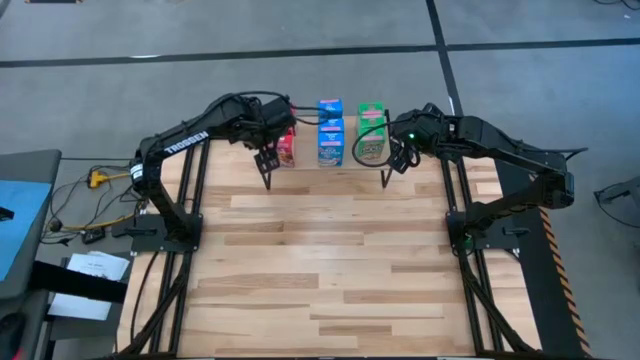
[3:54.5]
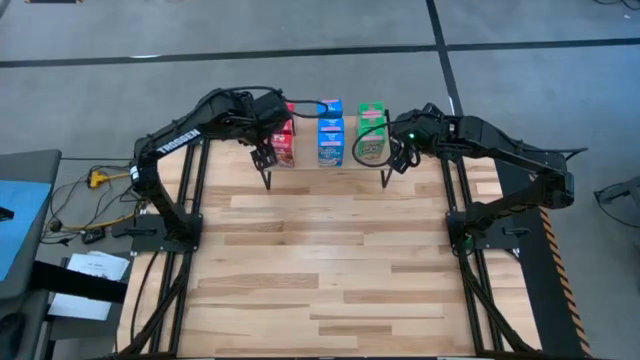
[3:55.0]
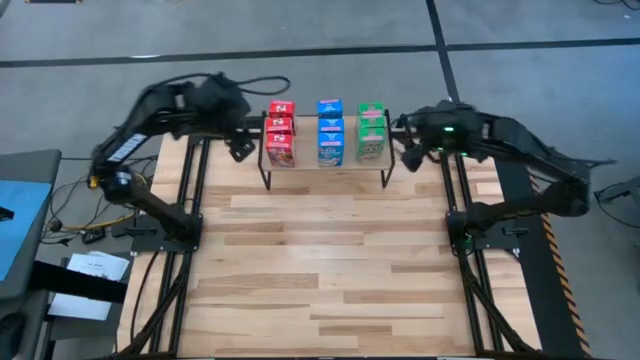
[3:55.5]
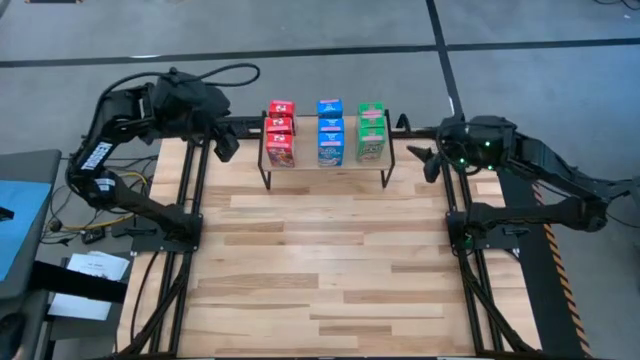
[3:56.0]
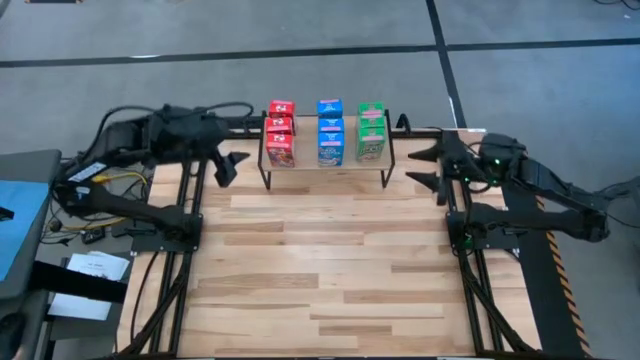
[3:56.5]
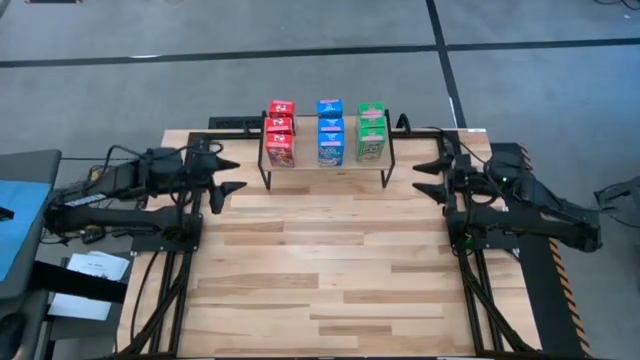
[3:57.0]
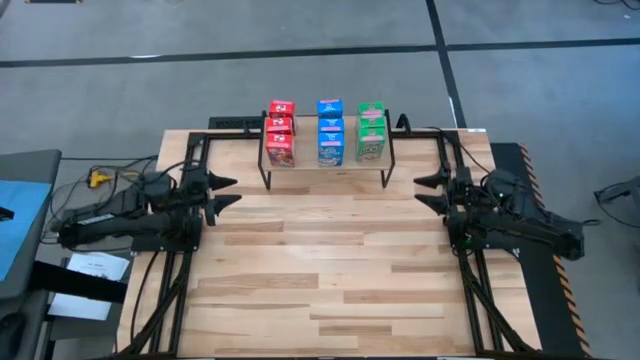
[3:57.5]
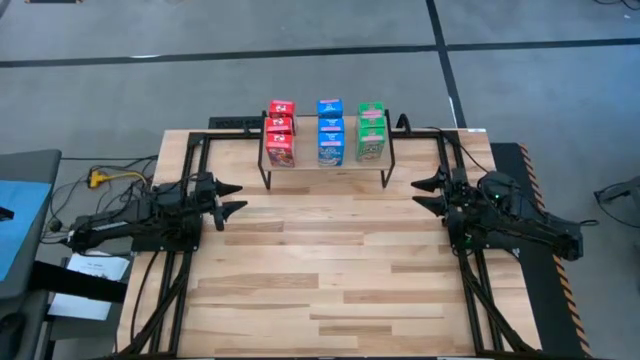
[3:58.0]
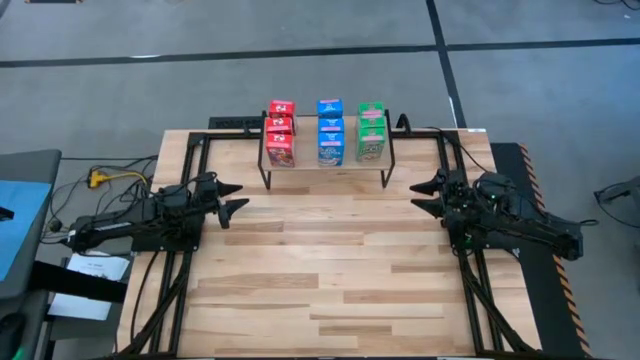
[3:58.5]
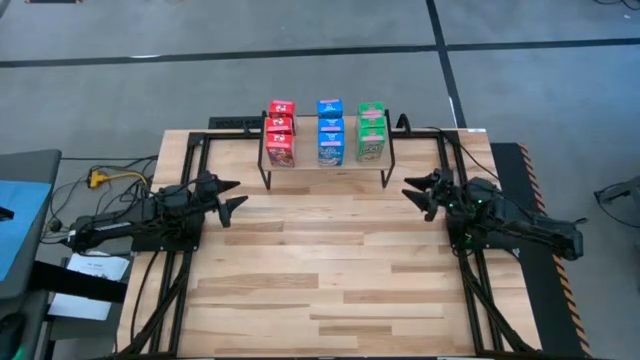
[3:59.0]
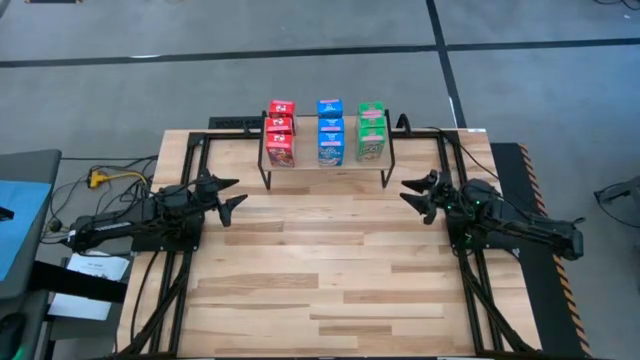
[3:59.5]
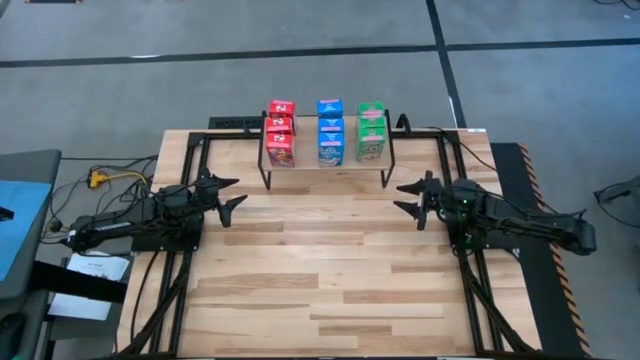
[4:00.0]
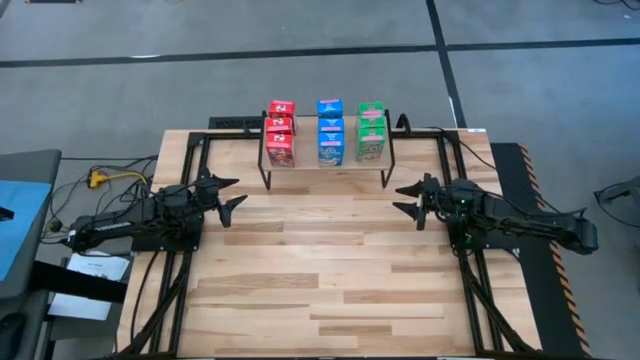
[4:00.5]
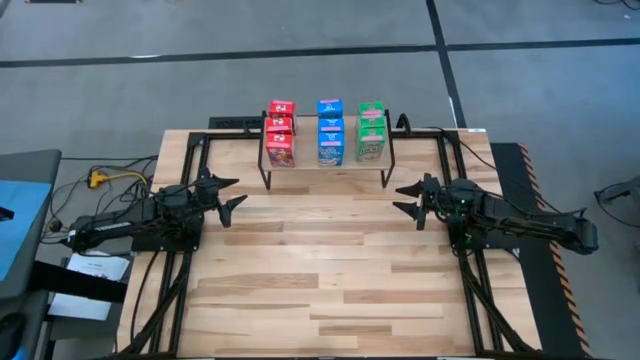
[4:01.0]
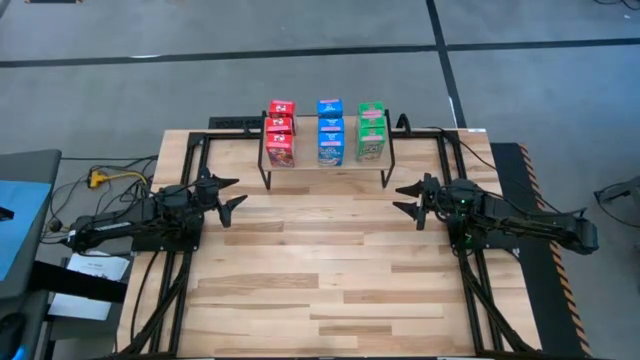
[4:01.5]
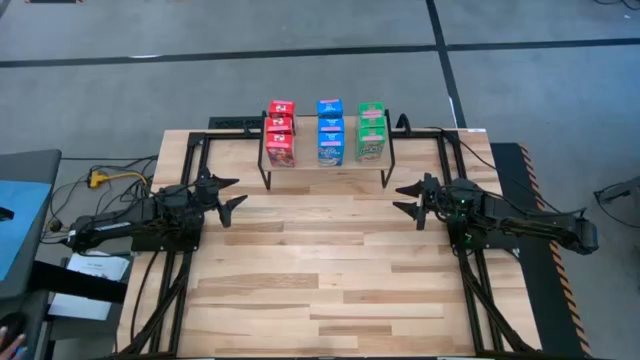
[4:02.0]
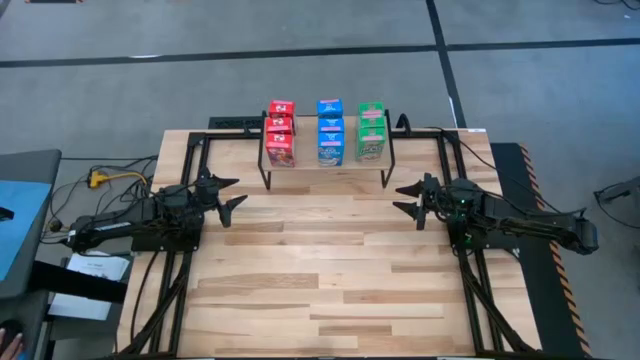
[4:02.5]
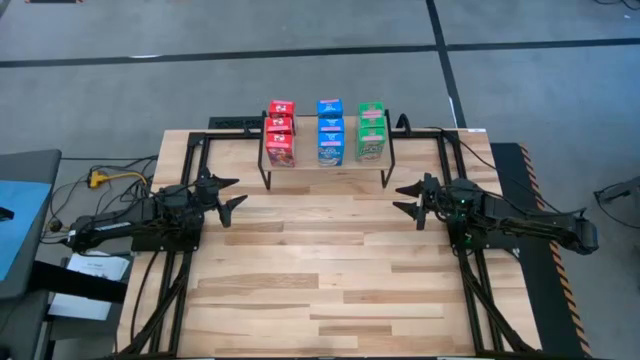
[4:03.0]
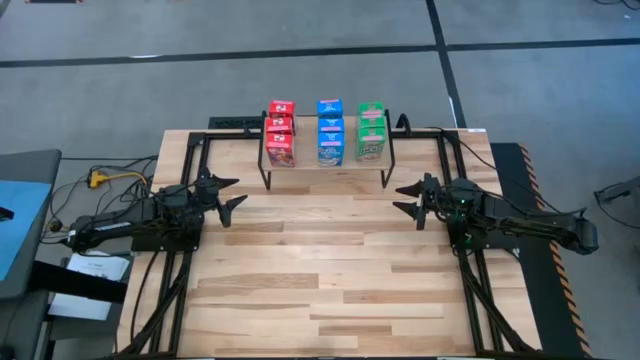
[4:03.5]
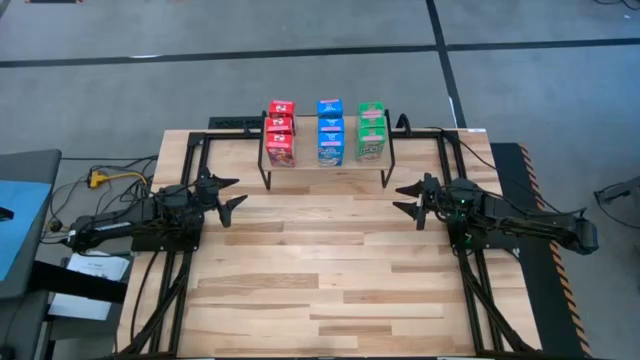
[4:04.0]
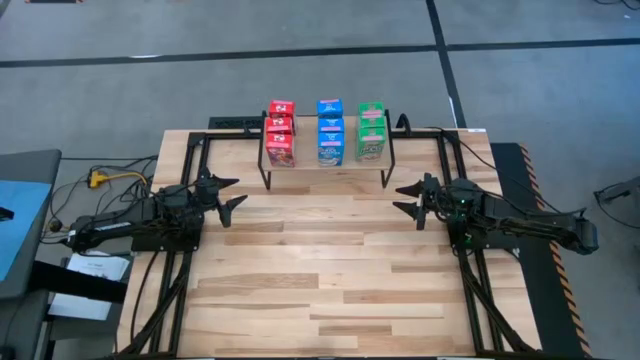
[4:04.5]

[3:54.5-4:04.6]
Task: Stack cereal on shelf
Return to Home Position

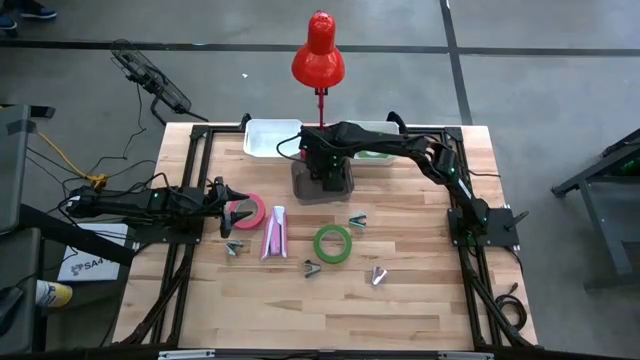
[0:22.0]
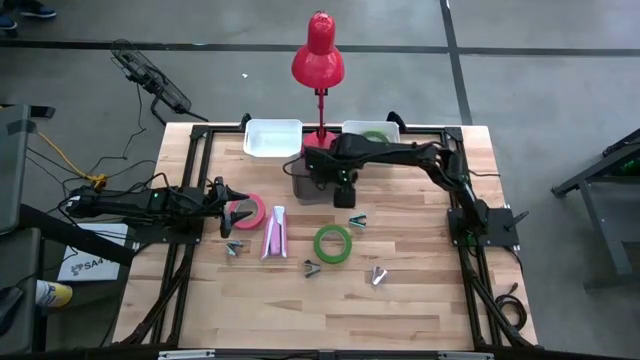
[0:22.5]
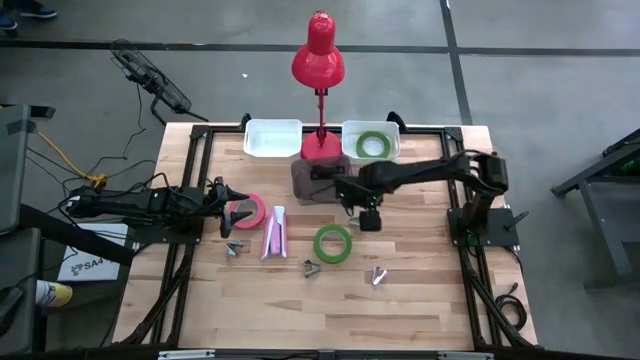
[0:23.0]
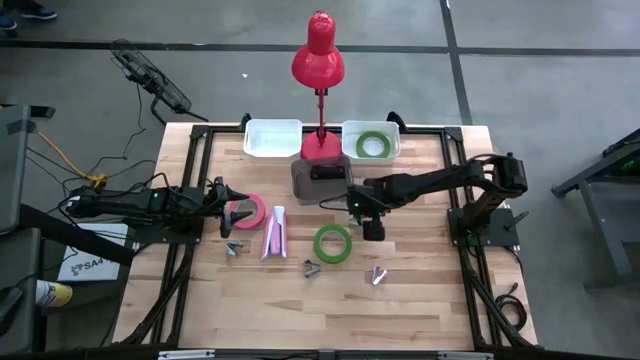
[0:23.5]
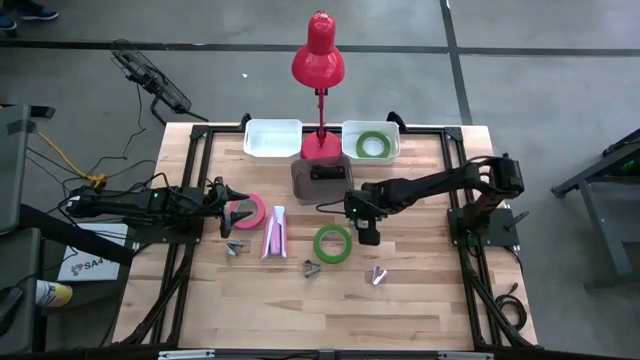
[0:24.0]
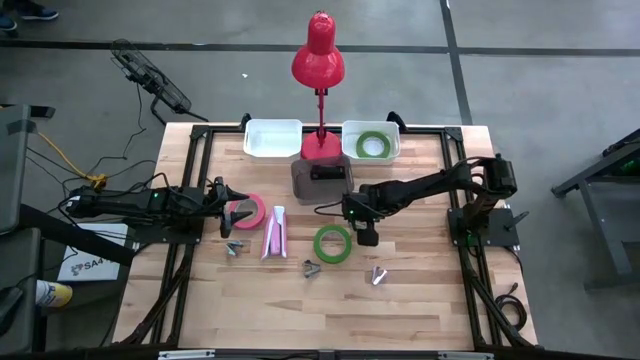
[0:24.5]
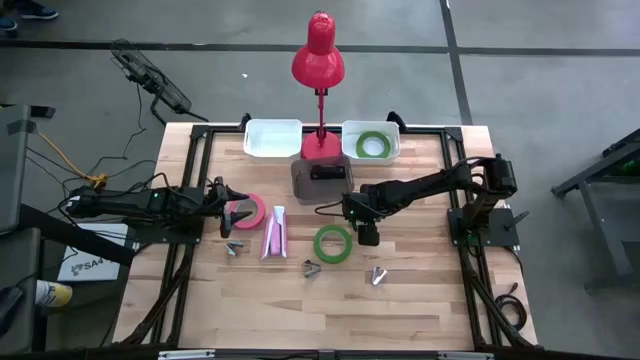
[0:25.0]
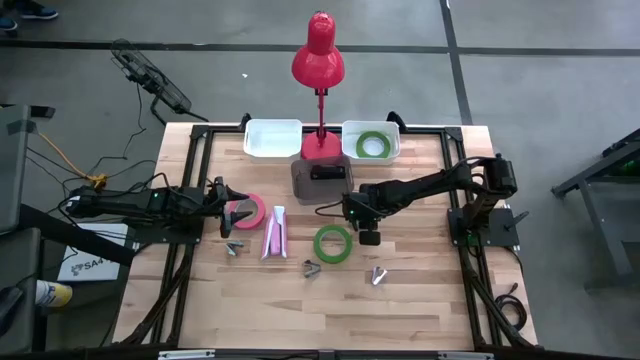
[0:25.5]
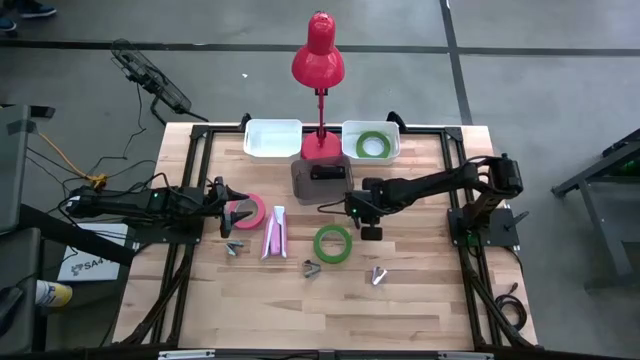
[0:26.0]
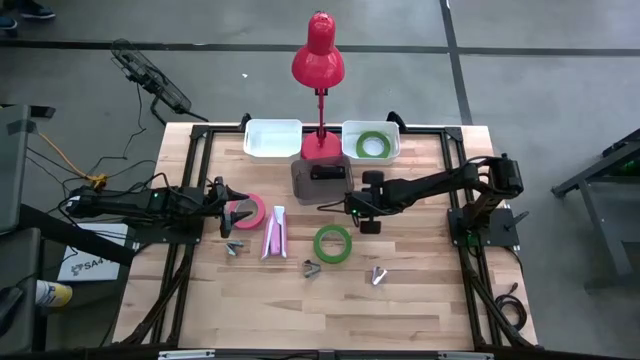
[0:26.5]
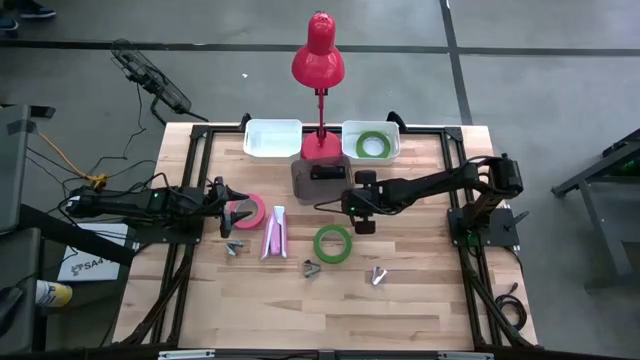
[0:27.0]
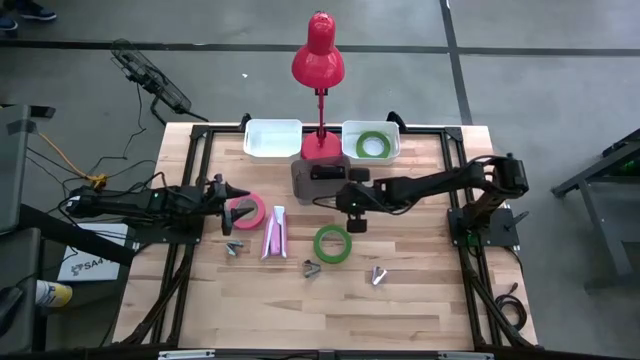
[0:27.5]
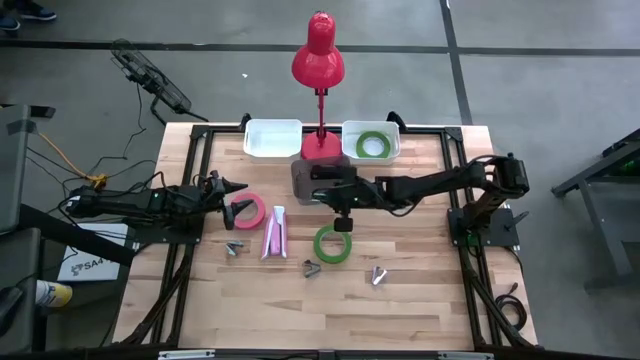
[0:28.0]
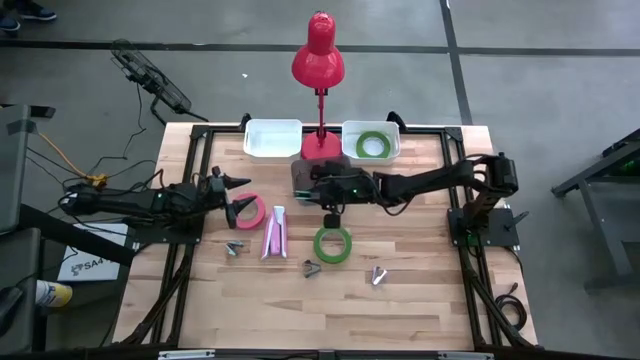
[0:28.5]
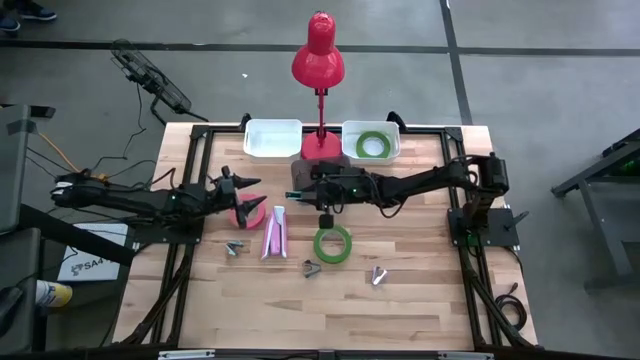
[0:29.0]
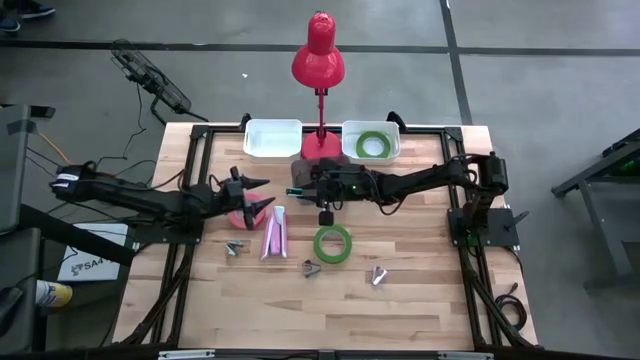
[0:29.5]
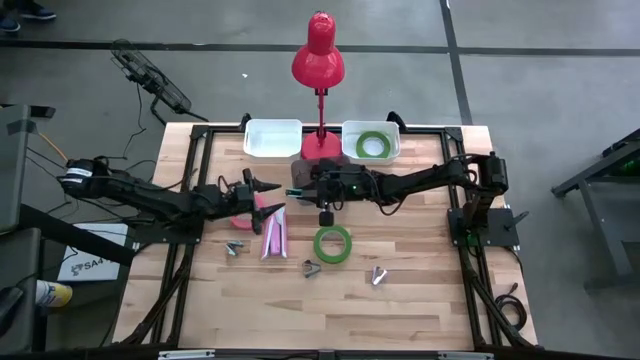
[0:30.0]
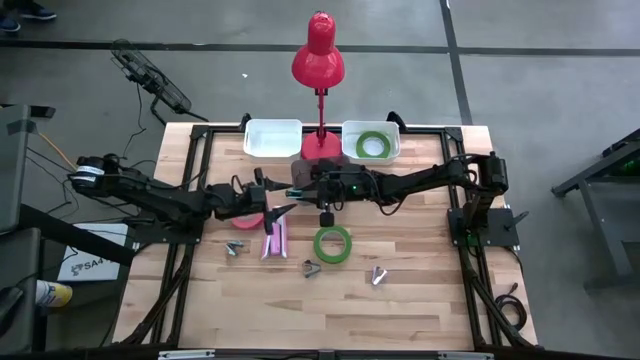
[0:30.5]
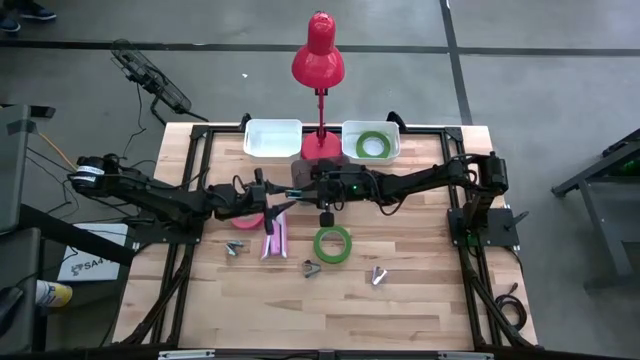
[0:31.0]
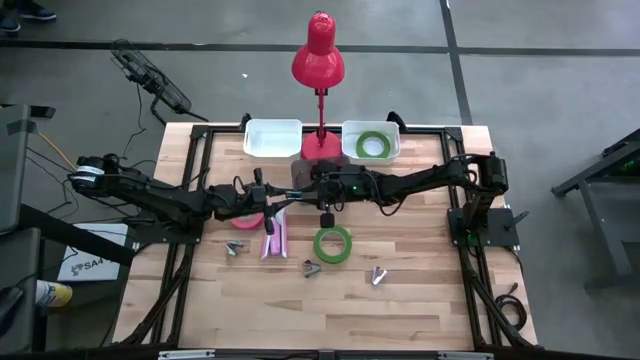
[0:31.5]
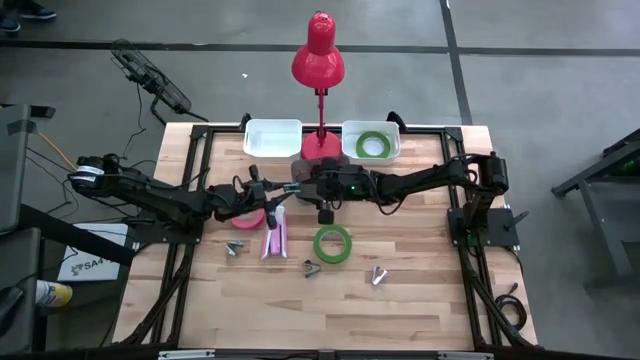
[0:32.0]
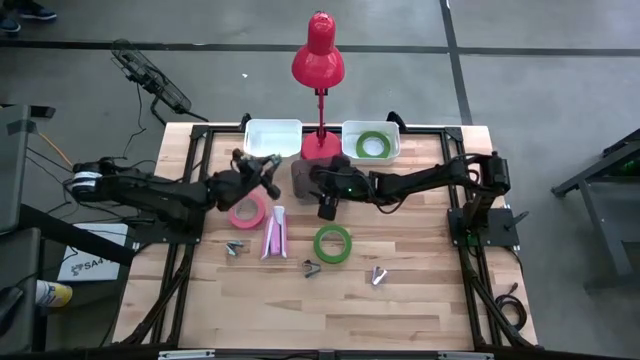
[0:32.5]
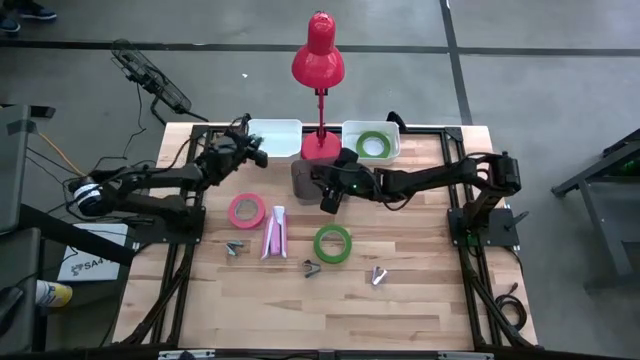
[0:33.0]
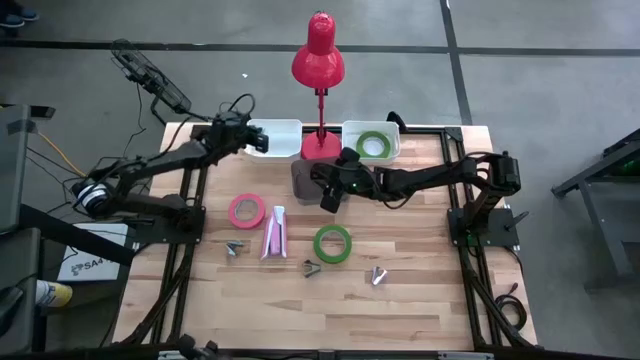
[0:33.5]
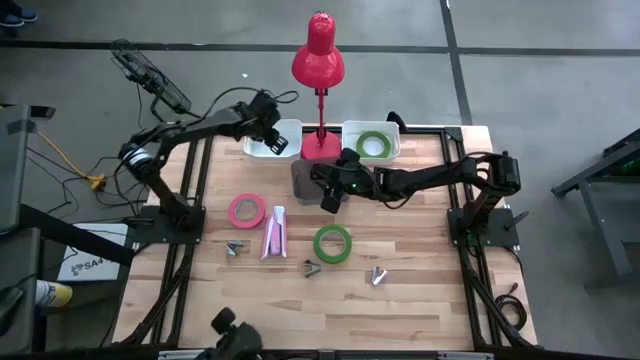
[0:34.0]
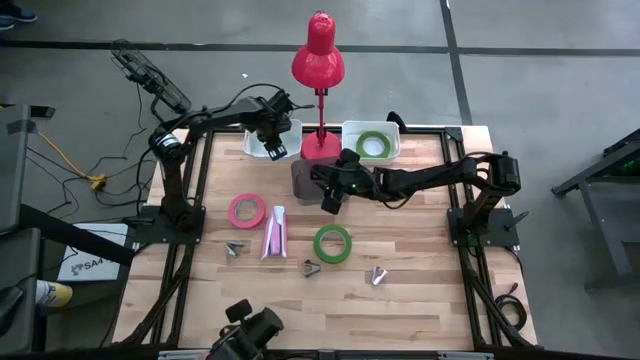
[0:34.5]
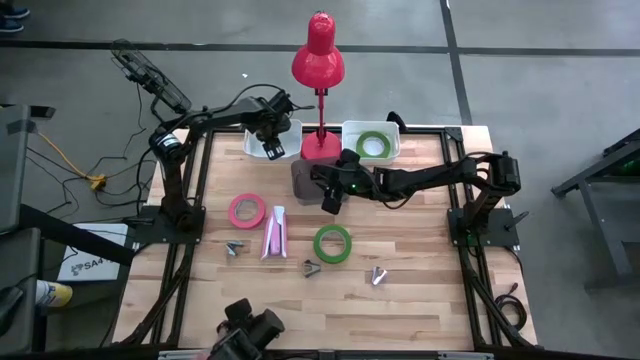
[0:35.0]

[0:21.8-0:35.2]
Task: Pick and place Stapler, Stapler remover, tape
Put the blue staple remover into the left white bin
